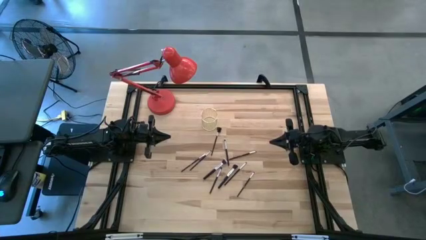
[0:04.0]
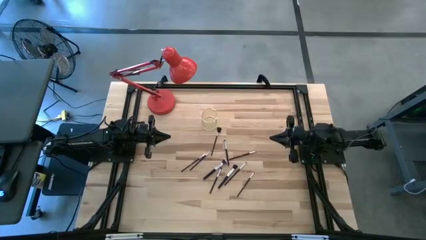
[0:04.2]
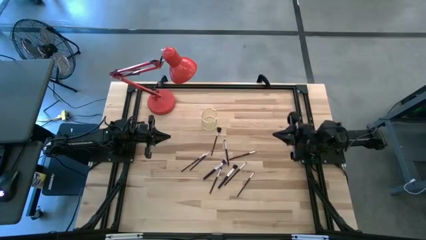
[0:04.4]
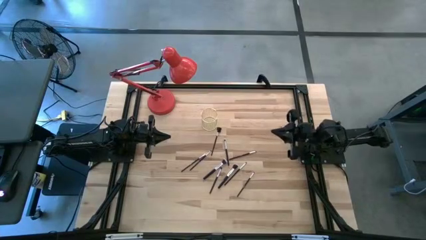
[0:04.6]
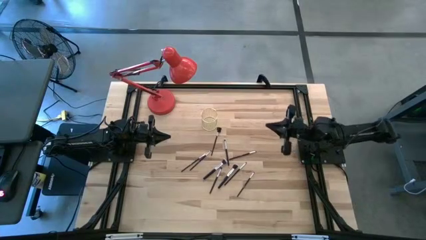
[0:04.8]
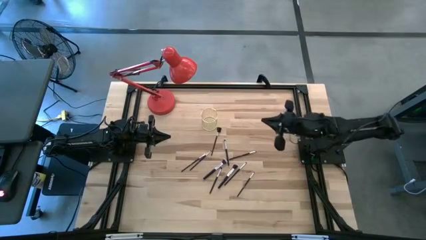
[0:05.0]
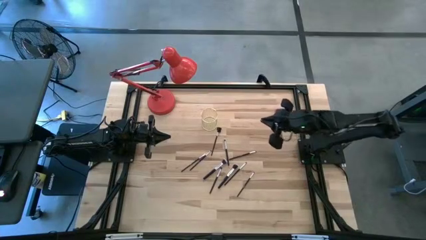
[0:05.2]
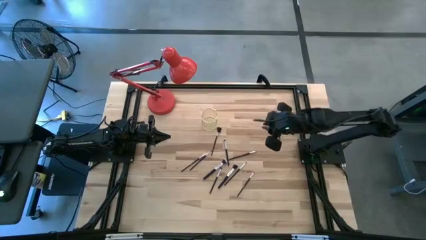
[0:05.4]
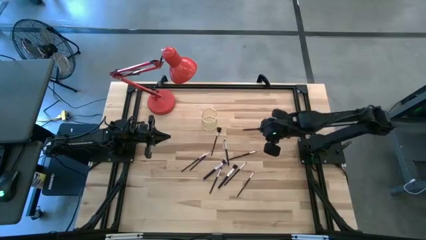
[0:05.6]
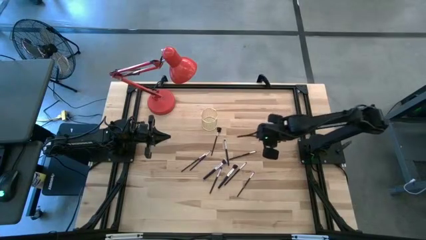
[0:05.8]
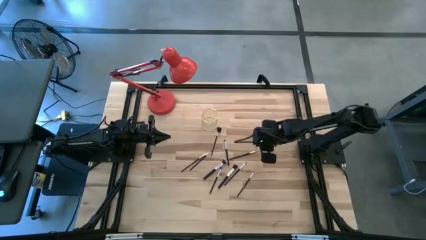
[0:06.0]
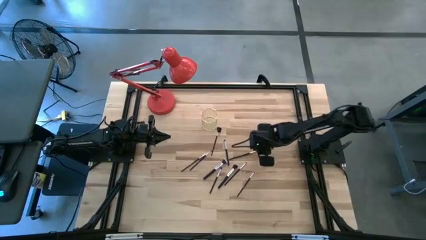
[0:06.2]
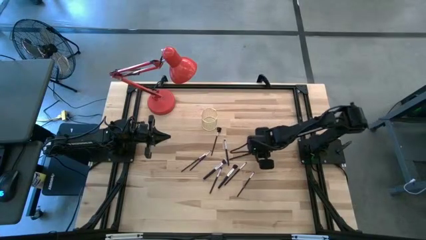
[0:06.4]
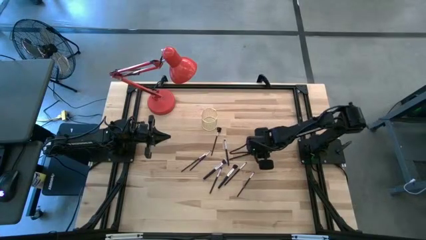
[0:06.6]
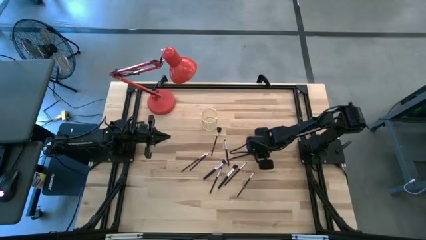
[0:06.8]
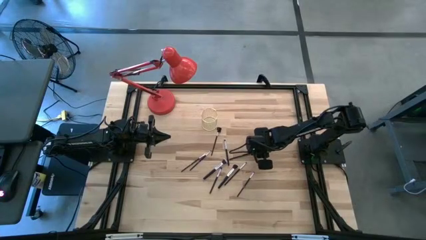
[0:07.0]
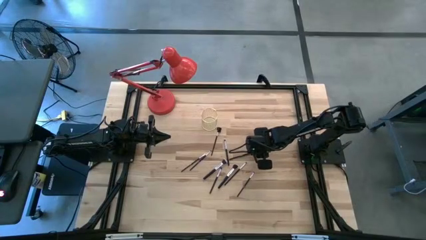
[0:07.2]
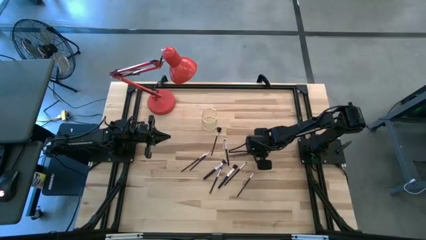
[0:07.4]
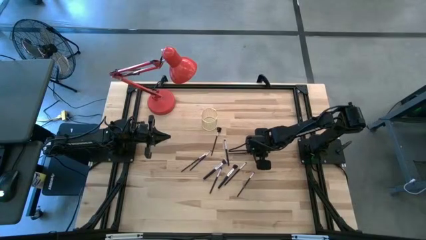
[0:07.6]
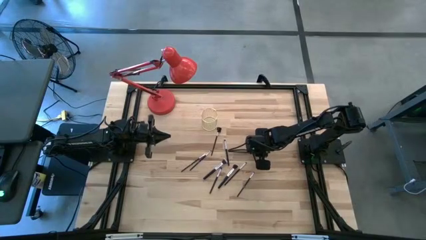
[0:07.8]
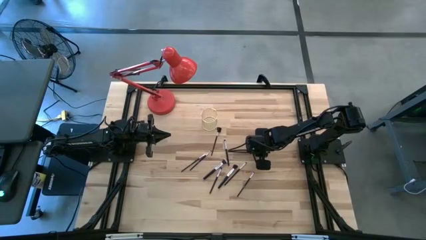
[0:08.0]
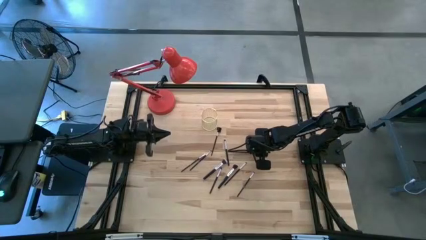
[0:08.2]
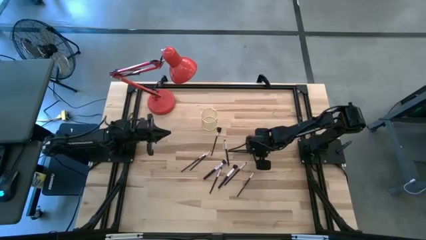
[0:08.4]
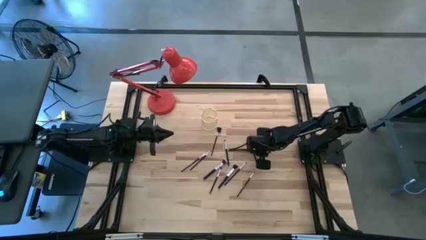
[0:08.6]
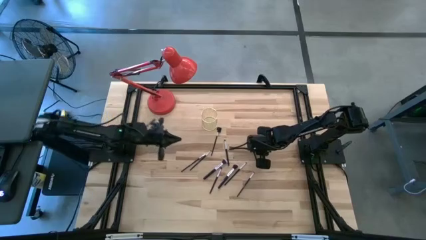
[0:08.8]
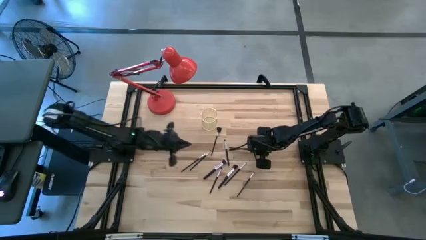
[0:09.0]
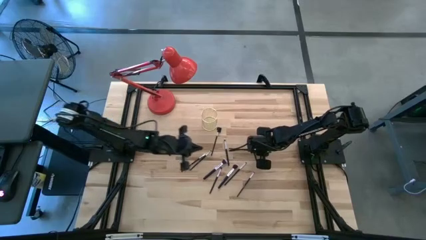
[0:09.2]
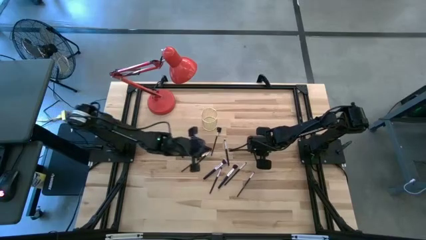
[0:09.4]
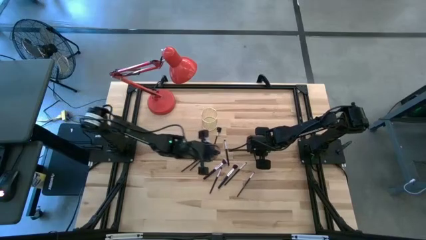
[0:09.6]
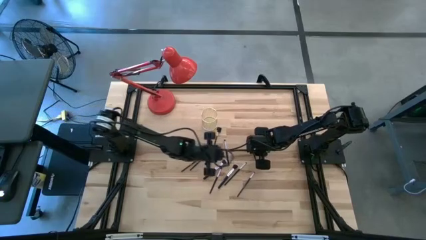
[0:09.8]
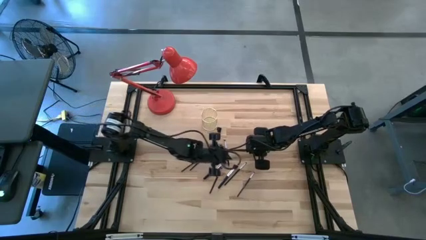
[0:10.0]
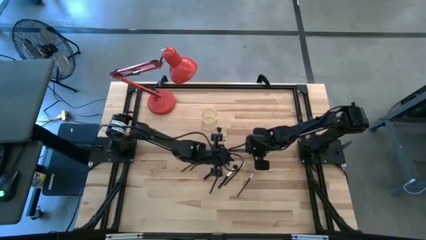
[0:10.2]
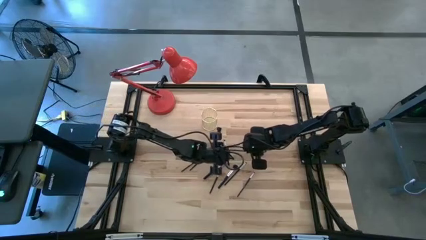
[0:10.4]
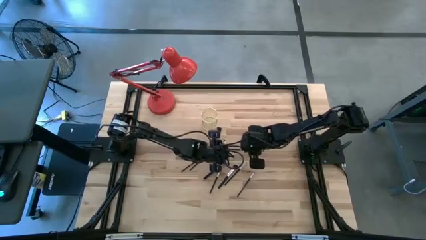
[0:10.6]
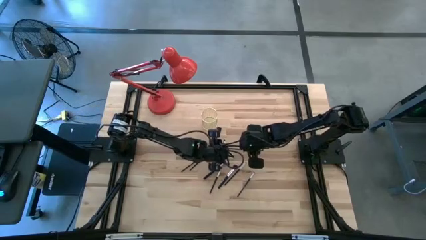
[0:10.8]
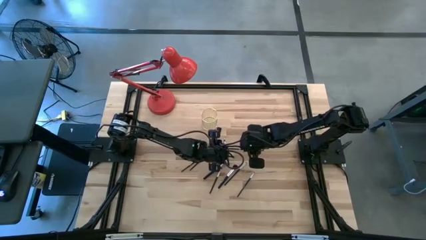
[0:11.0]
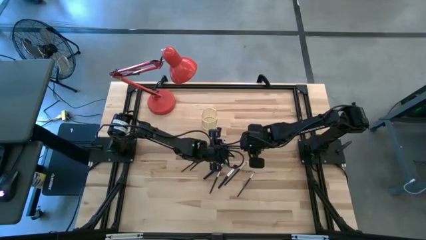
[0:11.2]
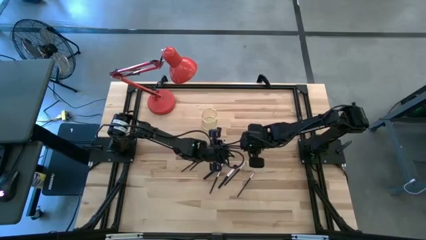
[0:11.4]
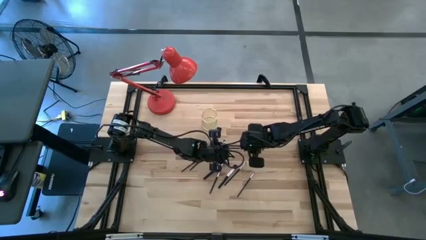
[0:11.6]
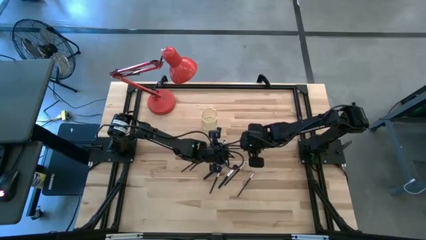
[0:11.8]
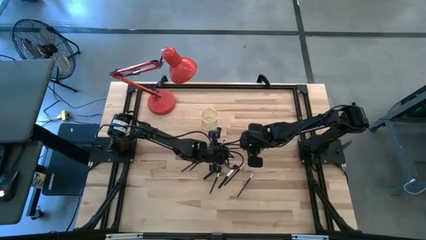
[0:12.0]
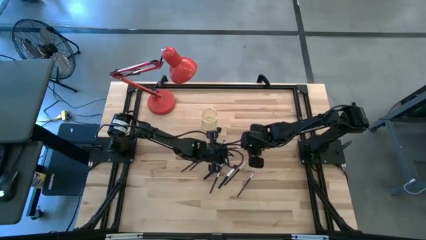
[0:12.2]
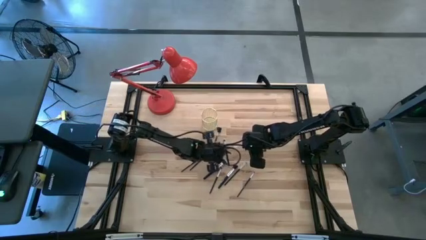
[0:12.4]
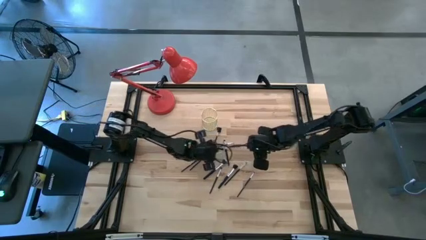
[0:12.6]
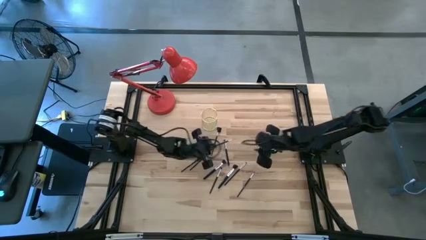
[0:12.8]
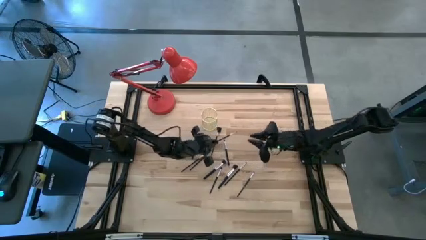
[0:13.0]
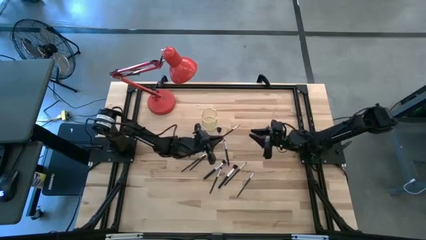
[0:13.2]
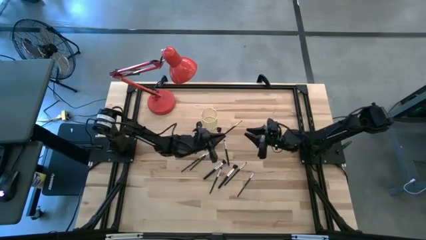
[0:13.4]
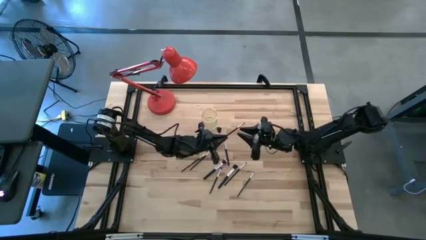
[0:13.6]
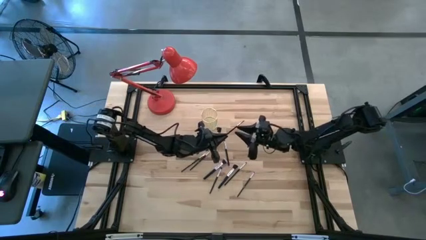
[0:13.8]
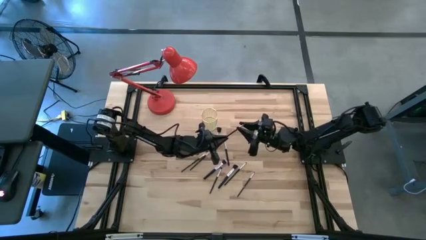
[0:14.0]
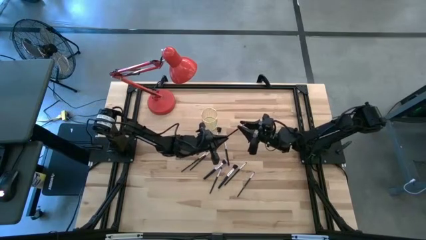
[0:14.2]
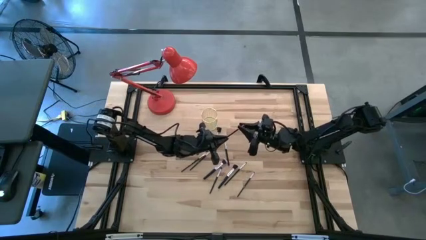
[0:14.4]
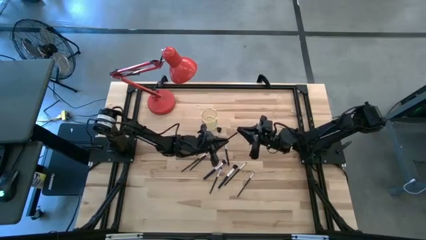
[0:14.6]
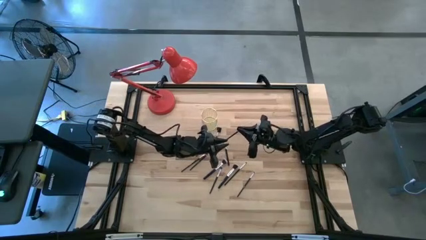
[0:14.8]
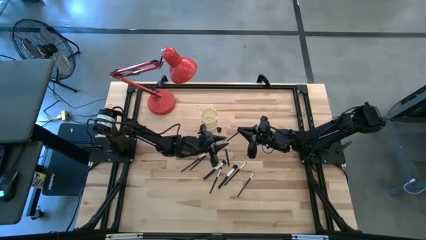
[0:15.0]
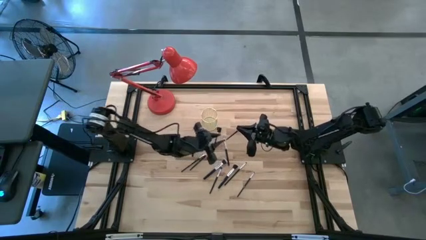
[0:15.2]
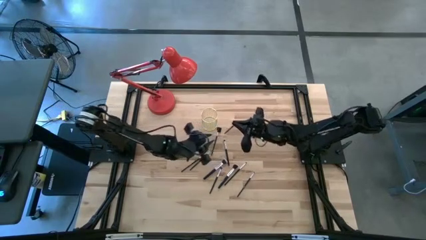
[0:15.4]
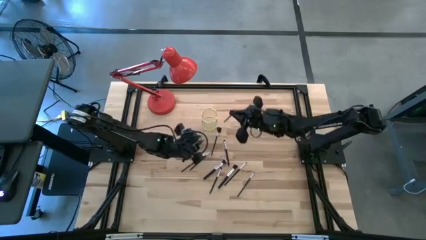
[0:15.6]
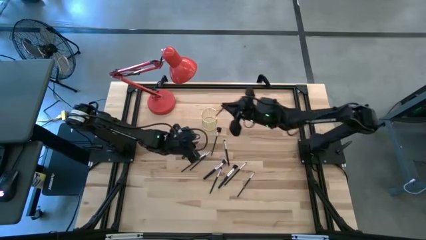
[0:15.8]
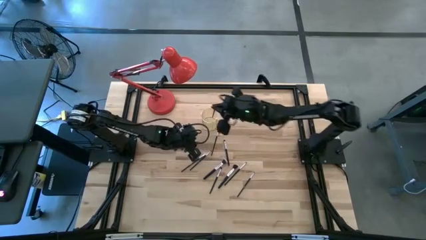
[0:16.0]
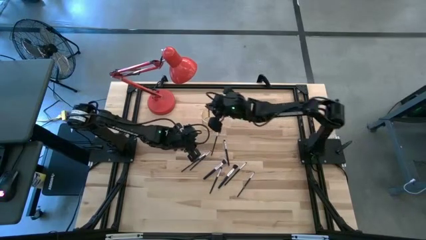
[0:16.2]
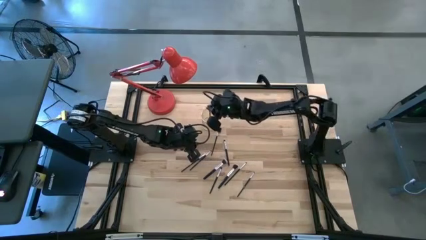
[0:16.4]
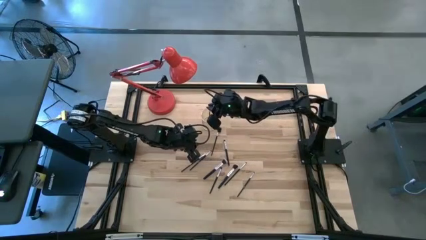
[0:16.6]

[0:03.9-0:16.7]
Task: Put items in baskets/containers
Put the black eyeshadow brush into the gold pen holder

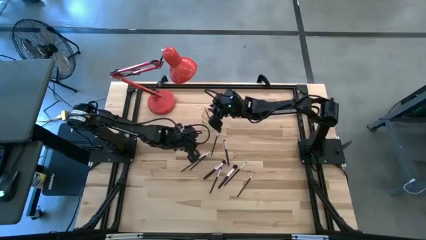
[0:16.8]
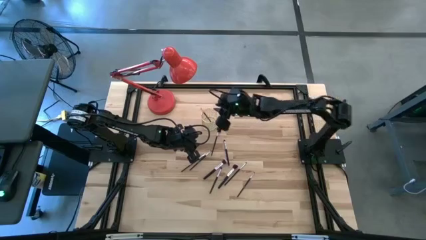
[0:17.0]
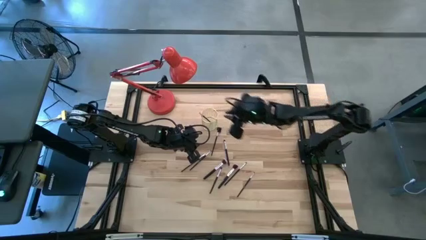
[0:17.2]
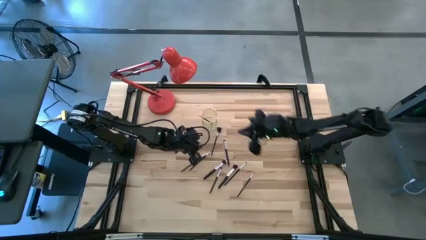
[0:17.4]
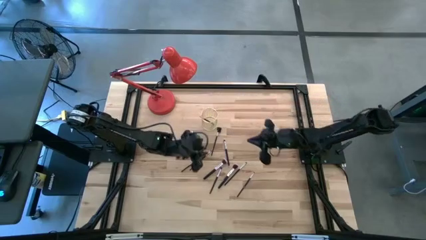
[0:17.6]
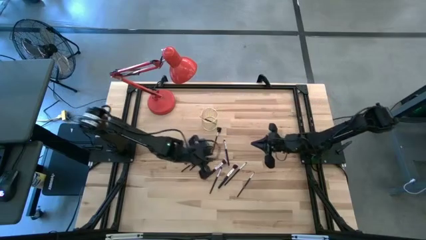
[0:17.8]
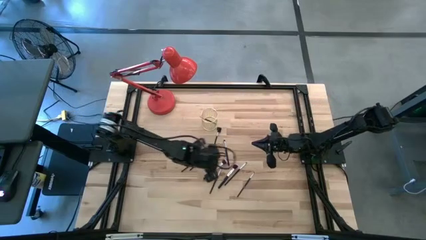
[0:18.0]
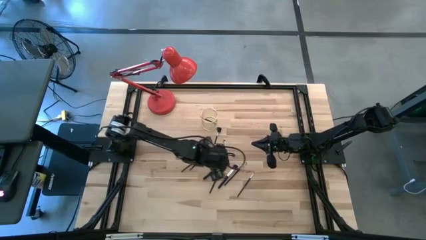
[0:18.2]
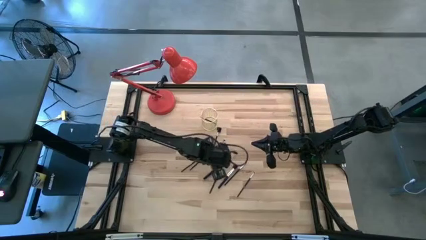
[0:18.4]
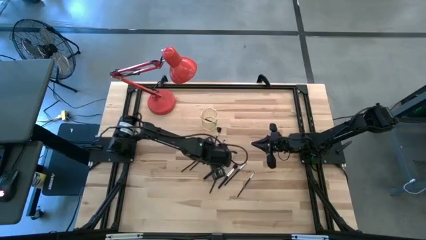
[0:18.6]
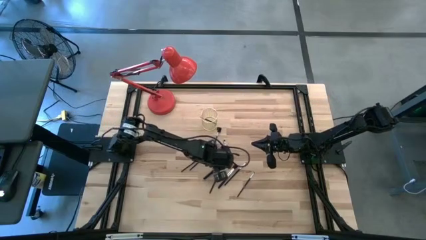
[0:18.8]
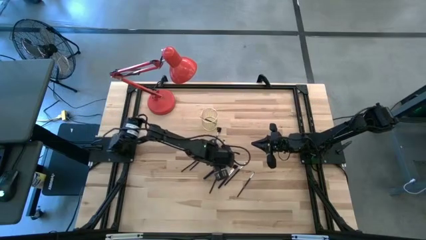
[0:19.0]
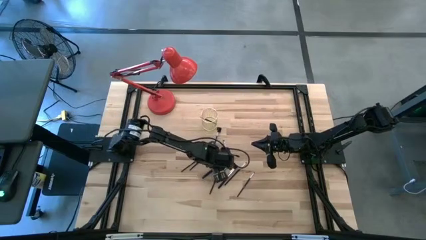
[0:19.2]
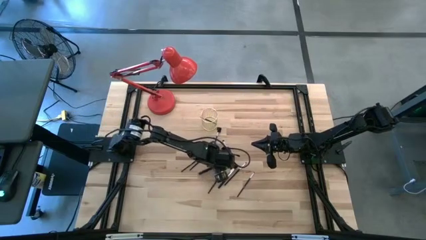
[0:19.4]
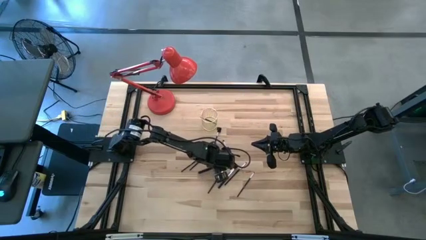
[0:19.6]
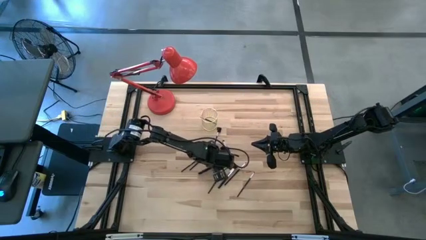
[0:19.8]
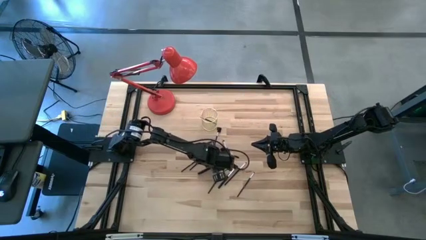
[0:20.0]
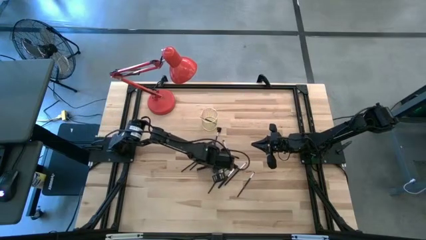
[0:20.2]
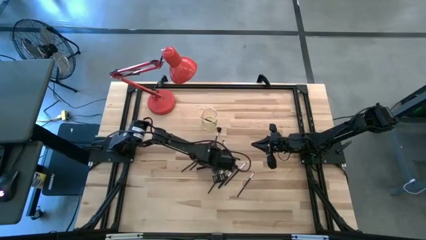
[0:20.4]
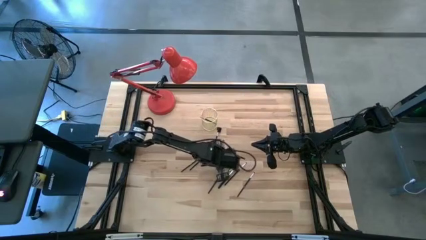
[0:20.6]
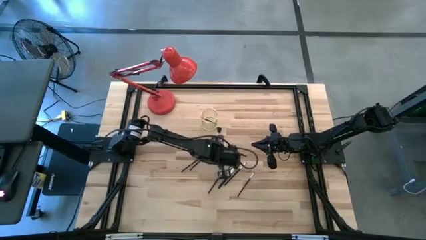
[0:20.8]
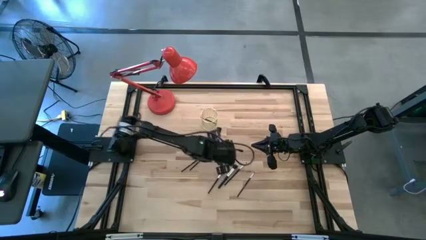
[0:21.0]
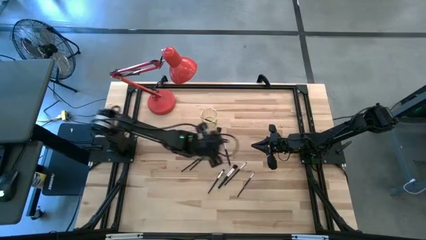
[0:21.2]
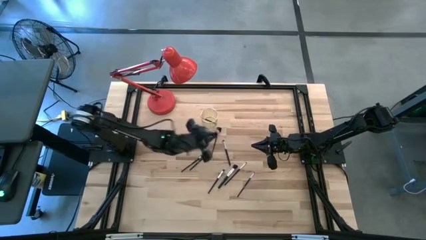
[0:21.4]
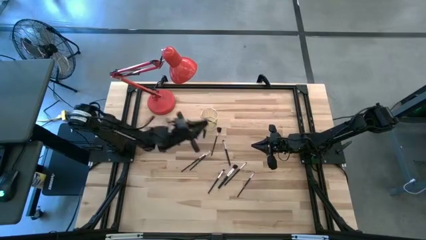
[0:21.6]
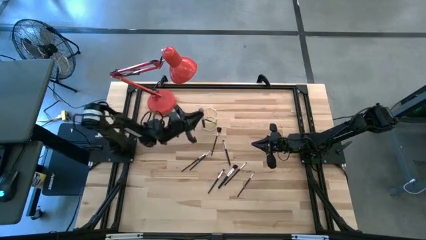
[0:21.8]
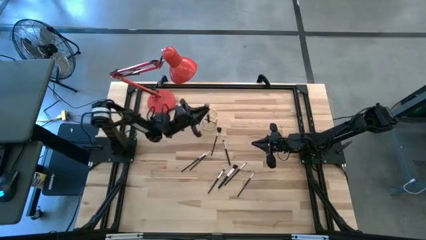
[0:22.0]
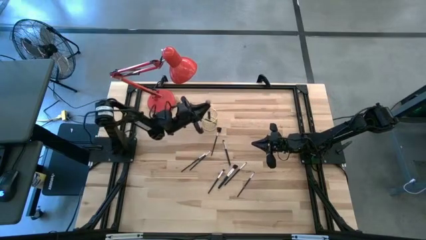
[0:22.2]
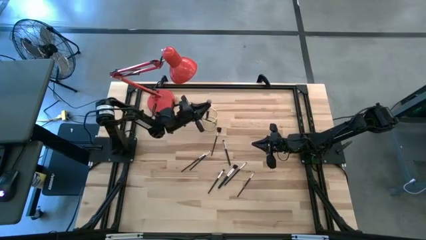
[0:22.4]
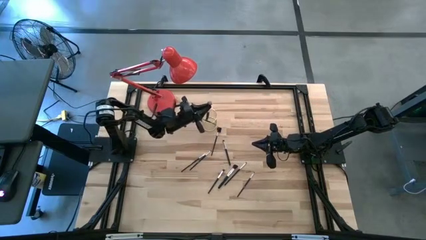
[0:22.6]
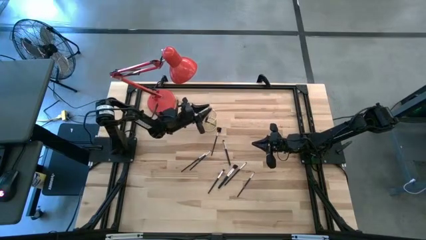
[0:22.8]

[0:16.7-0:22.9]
Put the black powder brush into the gold pen holder
